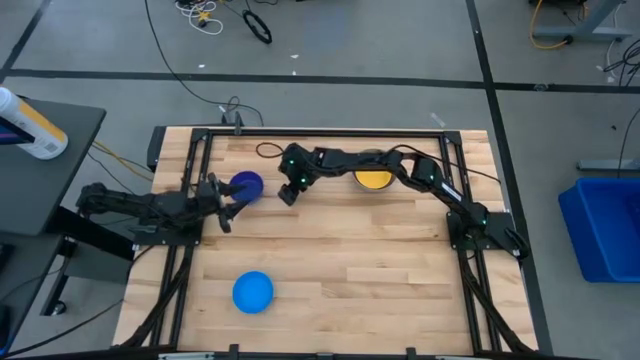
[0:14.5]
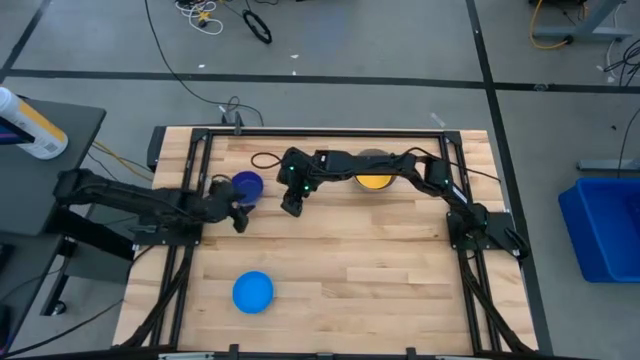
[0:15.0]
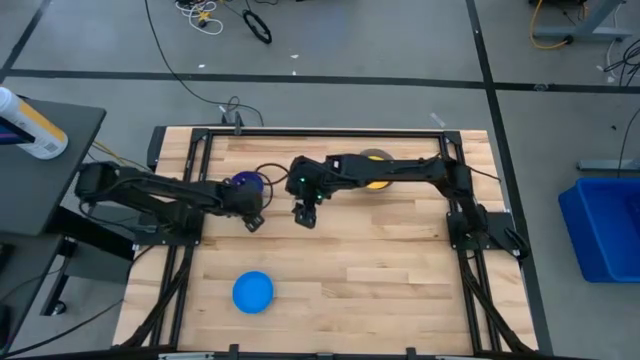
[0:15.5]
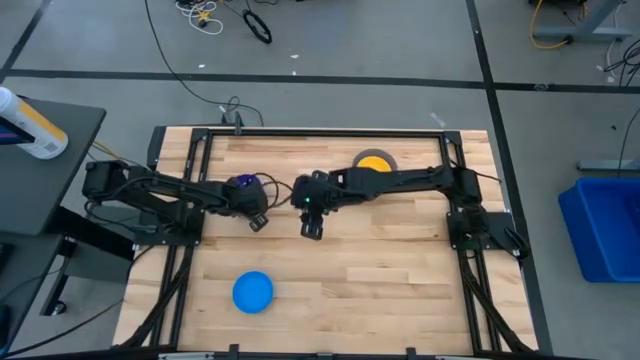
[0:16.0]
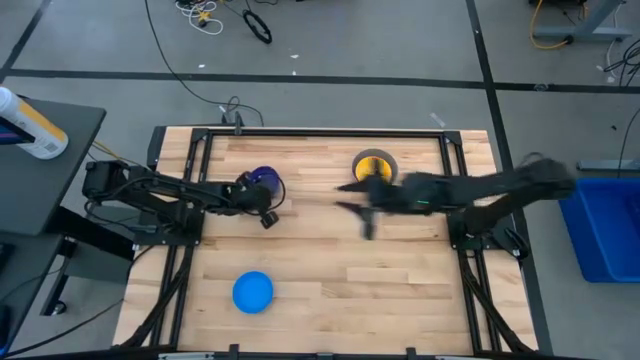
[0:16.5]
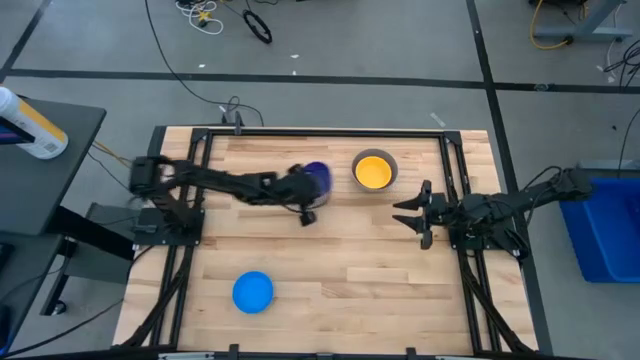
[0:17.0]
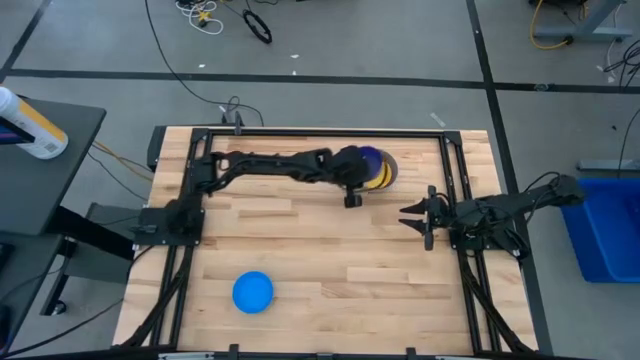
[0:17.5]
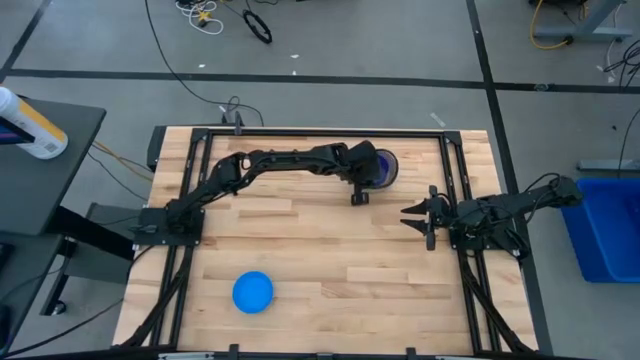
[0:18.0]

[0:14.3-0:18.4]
Stack the dark blue bowl on the yellow bowl

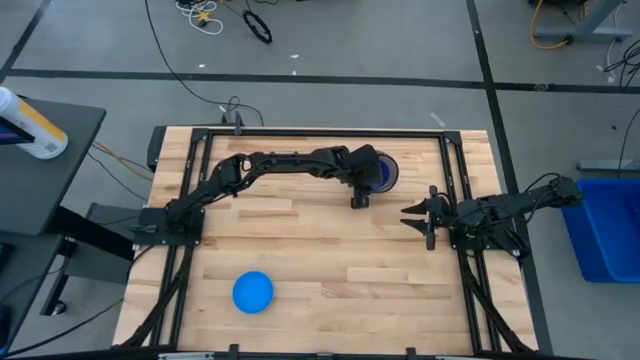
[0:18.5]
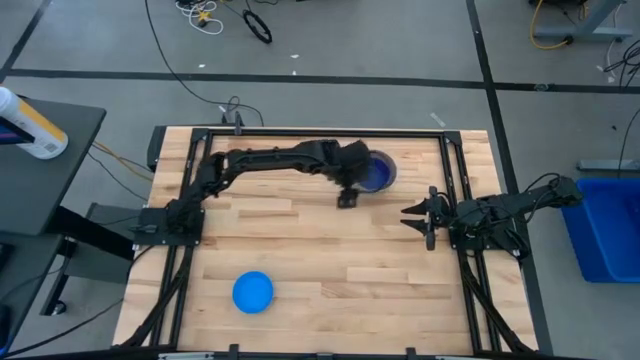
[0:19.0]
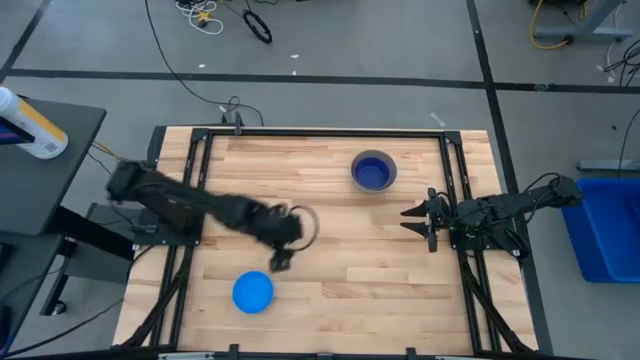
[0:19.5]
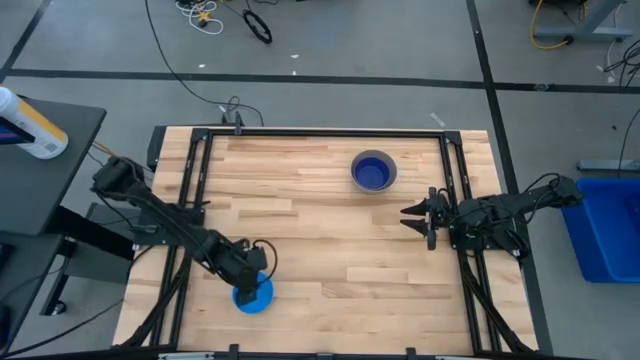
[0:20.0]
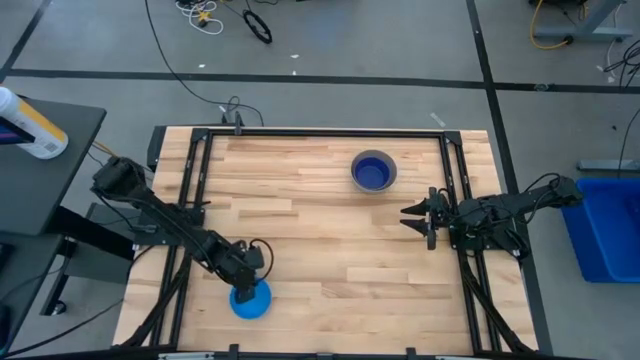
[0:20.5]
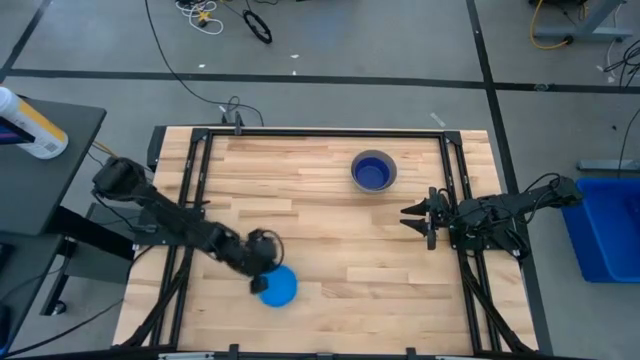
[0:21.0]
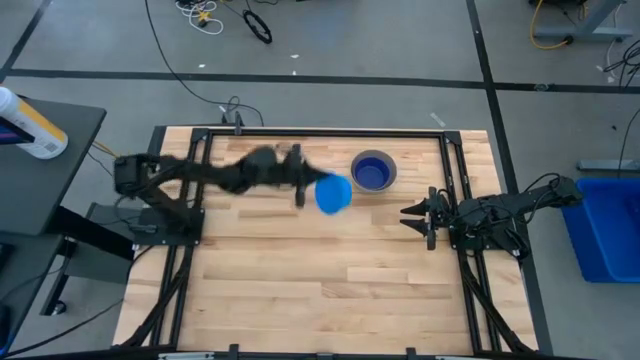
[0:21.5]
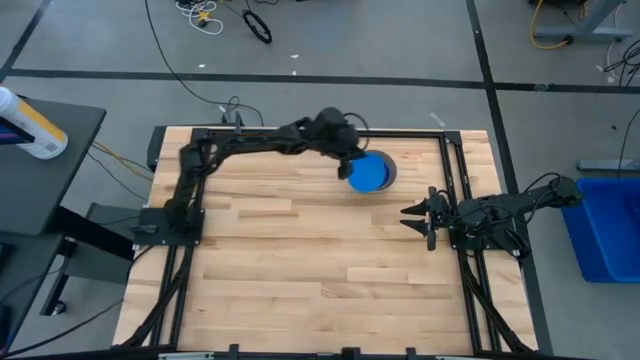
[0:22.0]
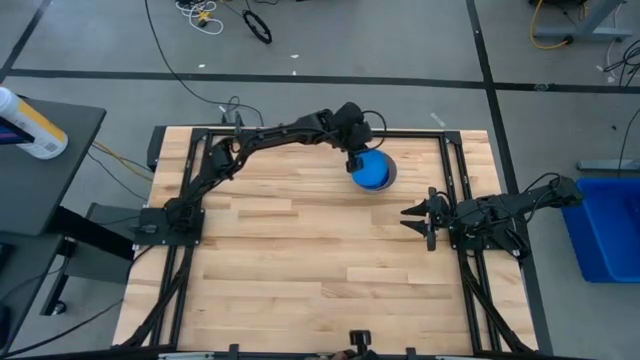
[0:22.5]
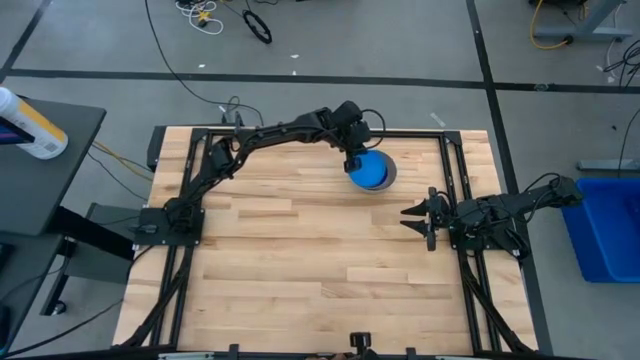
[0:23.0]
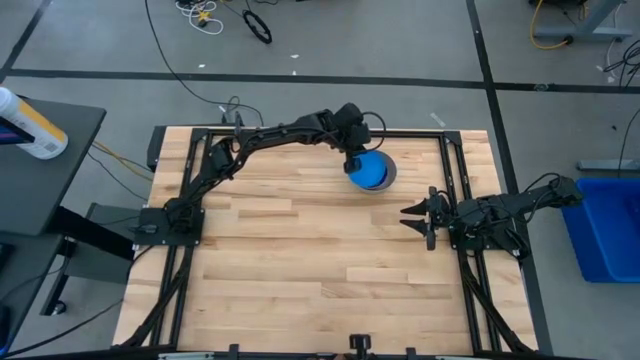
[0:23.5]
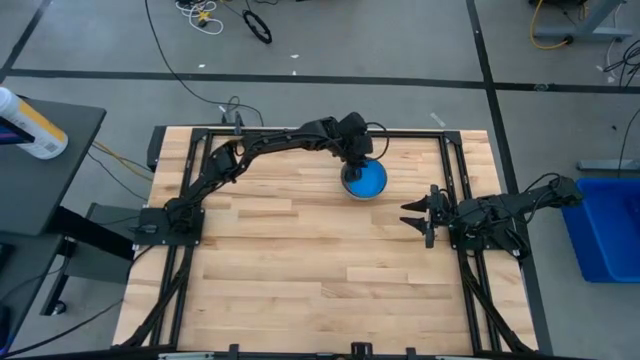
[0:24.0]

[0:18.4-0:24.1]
Stack the blue bowl on the dark blue bowl

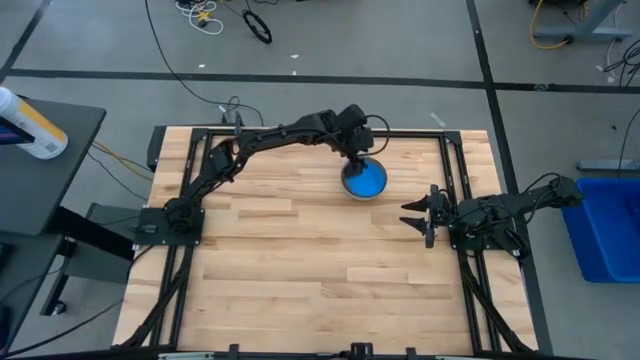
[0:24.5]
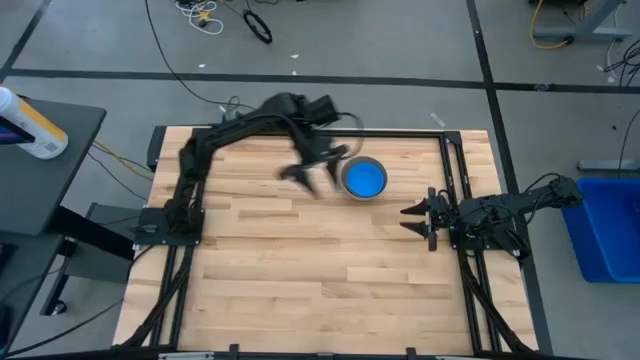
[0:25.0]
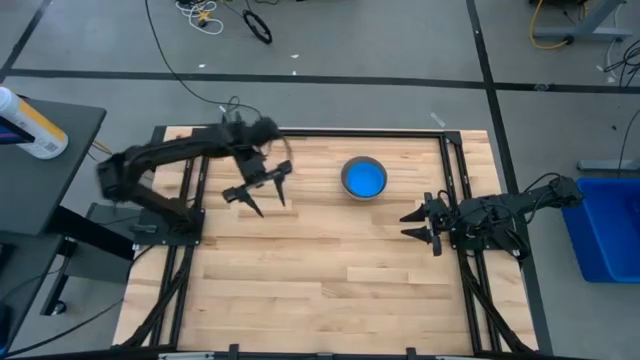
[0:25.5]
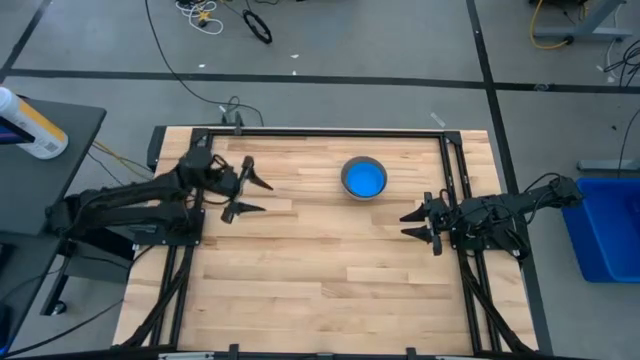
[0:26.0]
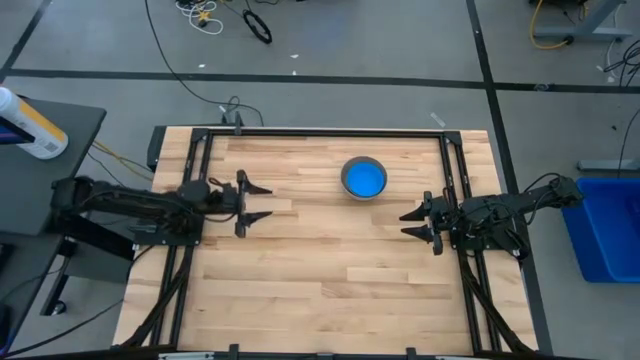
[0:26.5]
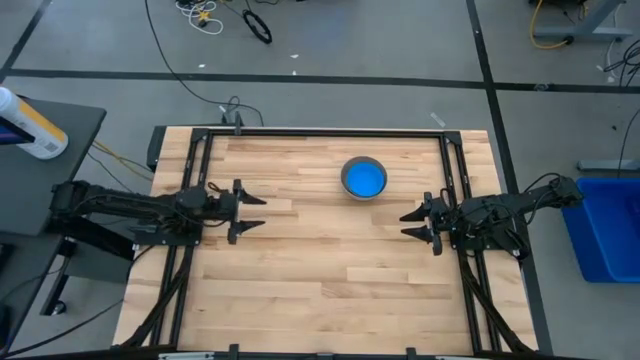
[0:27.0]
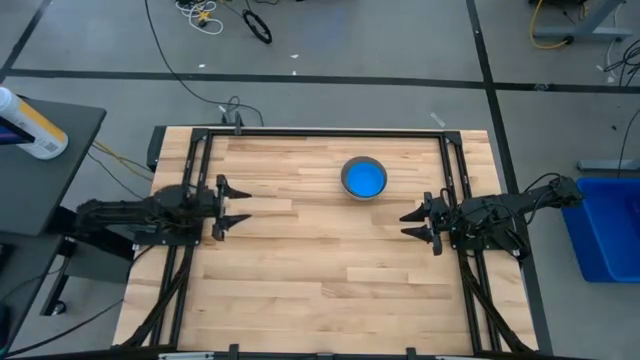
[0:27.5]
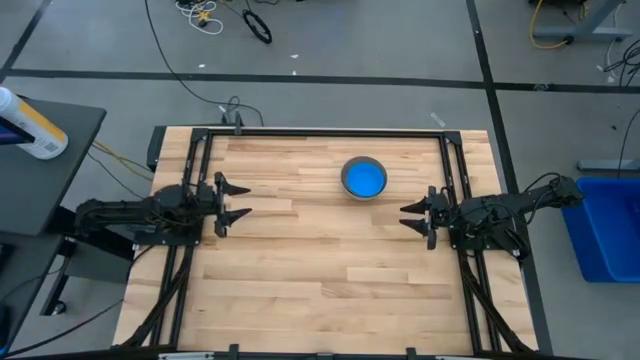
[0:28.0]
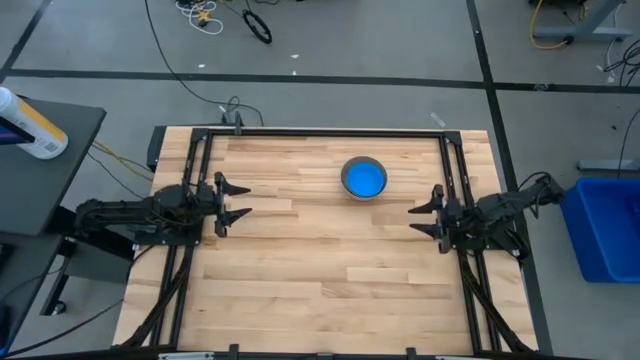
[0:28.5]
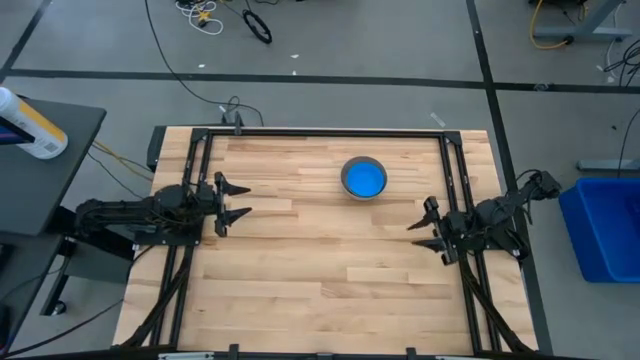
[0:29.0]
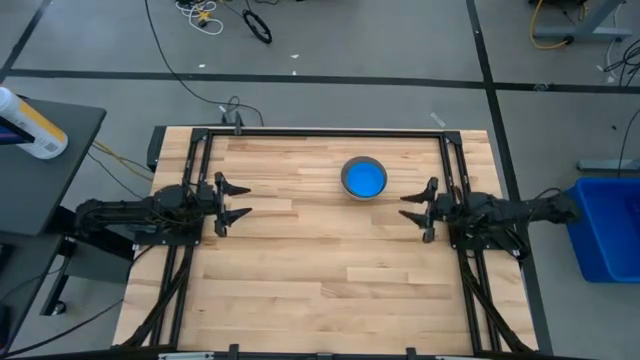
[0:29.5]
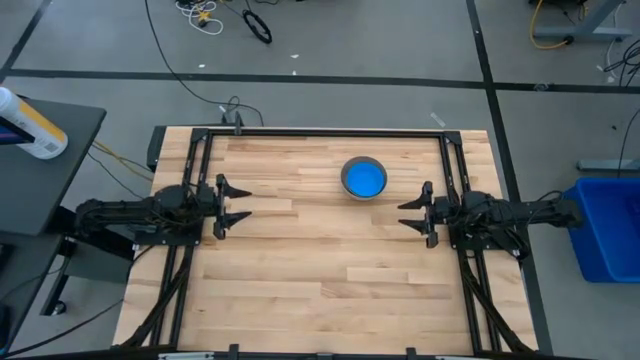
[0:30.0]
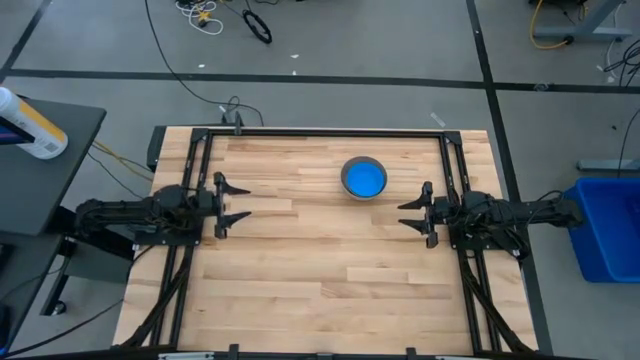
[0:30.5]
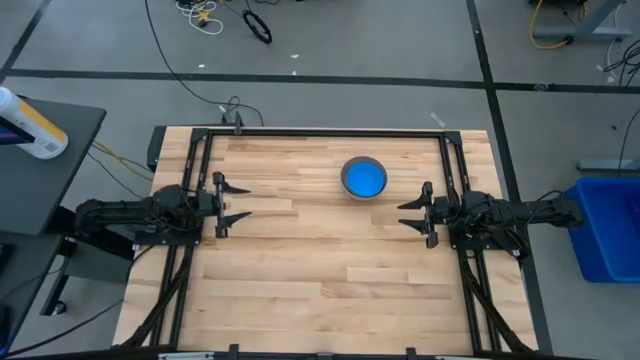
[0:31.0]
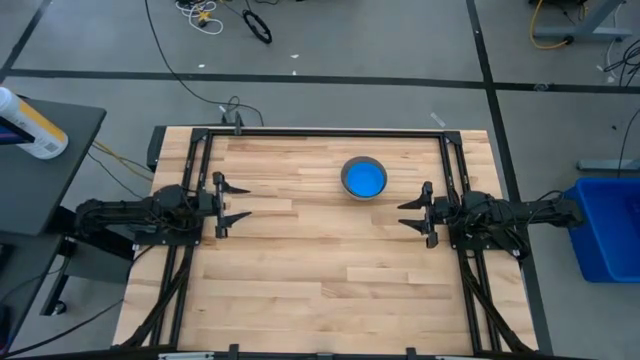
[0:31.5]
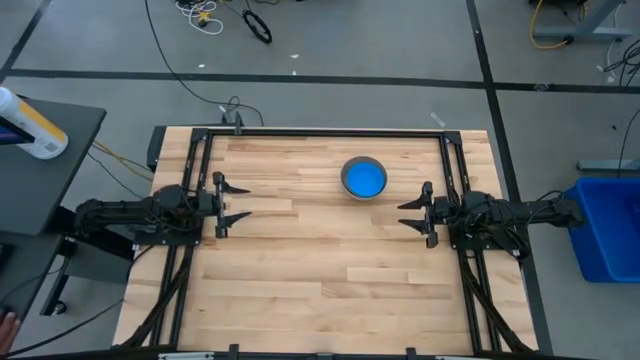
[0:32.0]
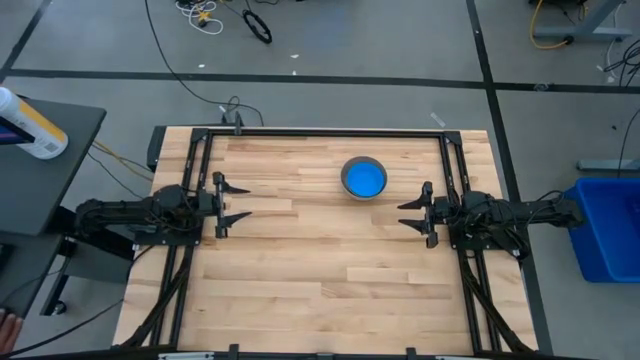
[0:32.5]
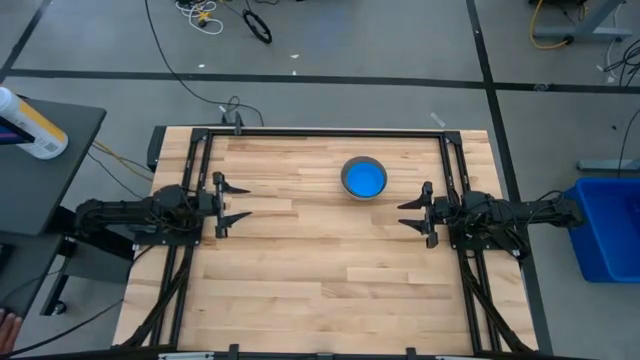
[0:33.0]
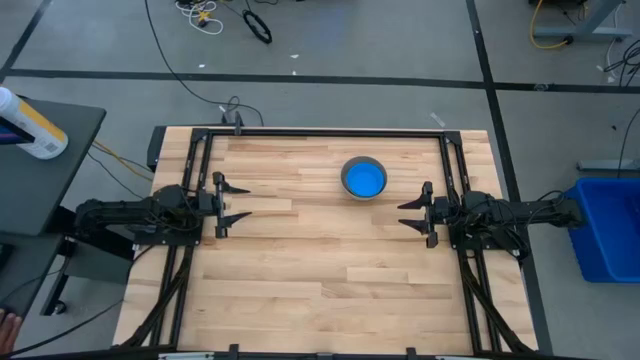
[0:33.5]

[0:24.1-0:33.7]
Return to Home Position
